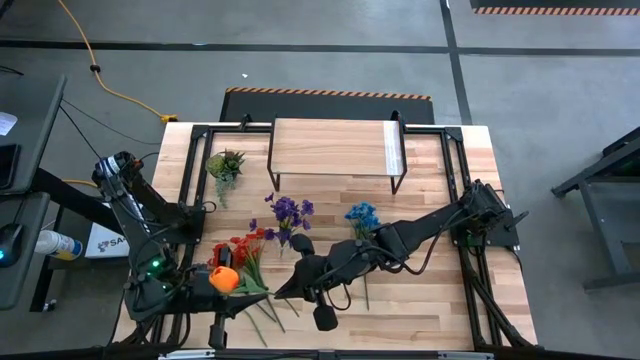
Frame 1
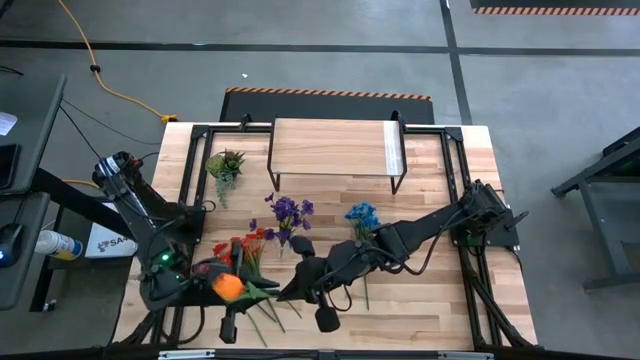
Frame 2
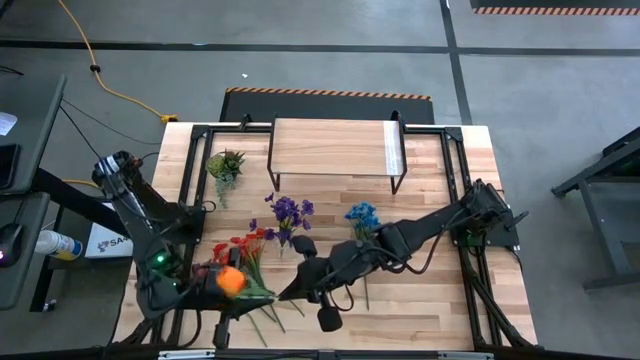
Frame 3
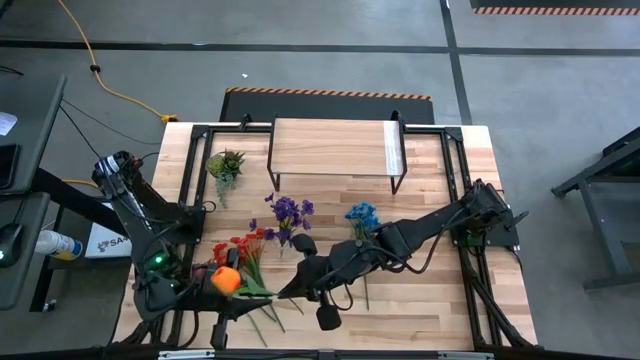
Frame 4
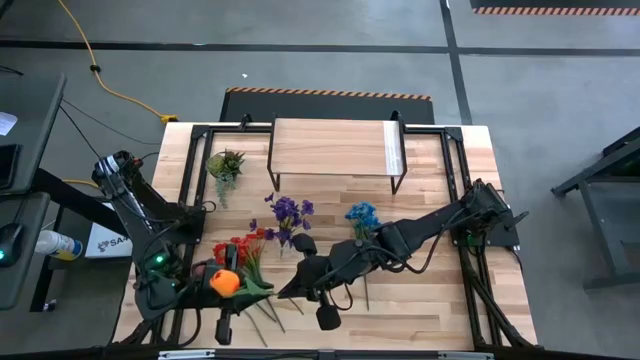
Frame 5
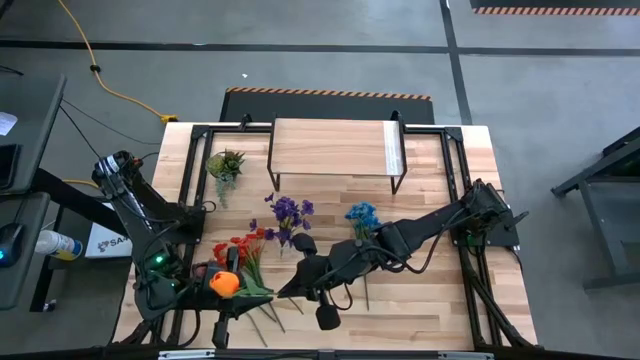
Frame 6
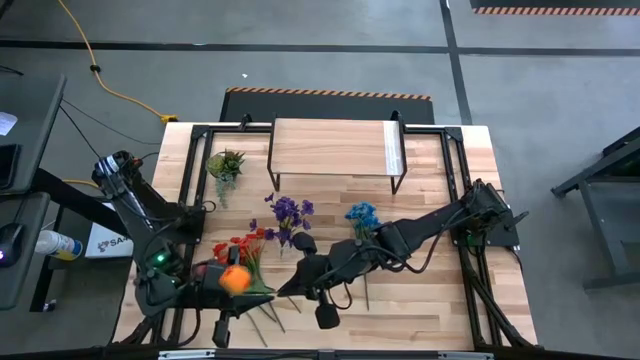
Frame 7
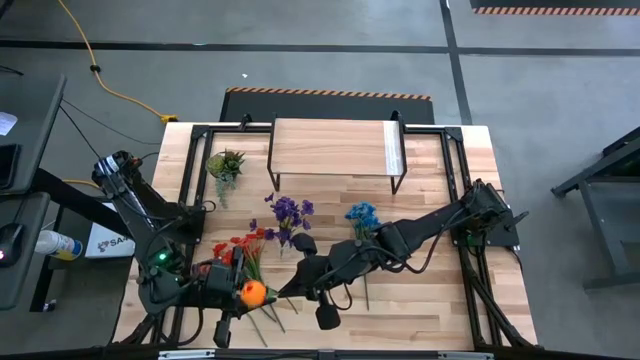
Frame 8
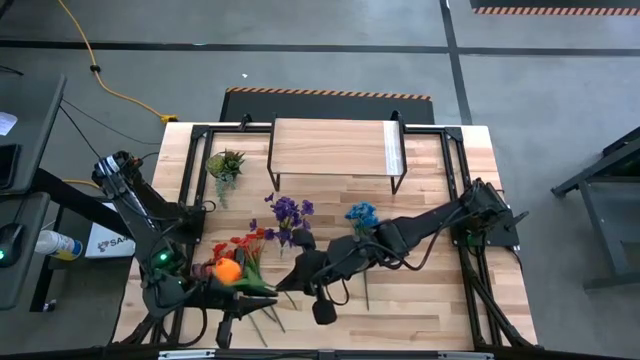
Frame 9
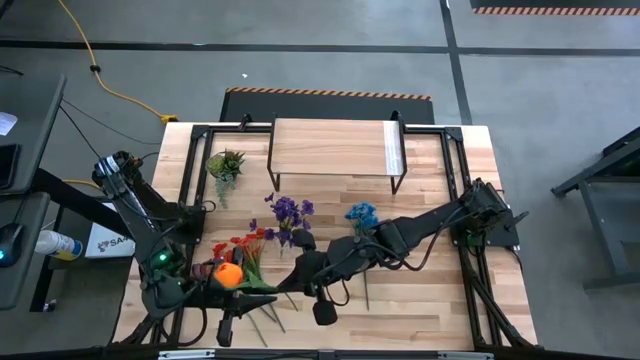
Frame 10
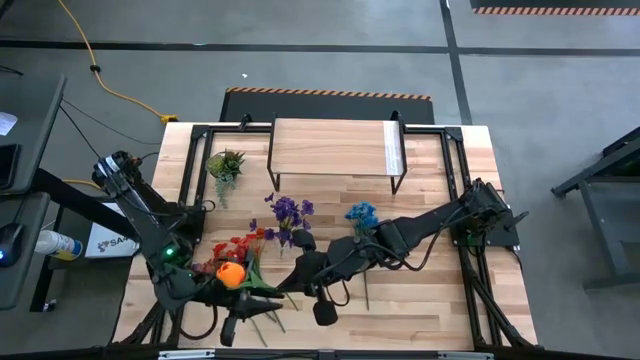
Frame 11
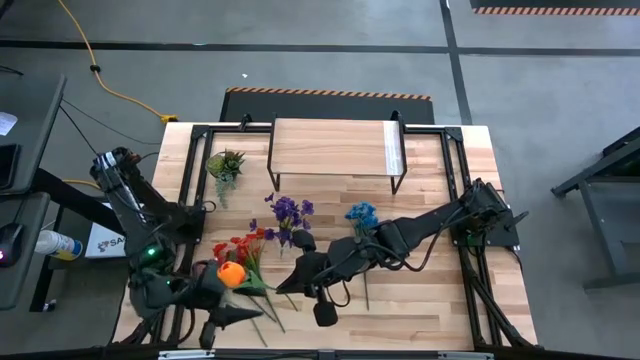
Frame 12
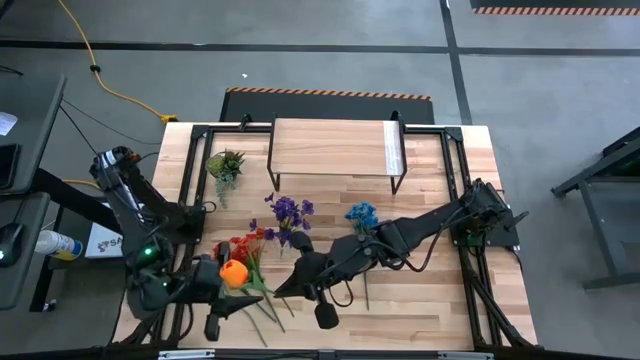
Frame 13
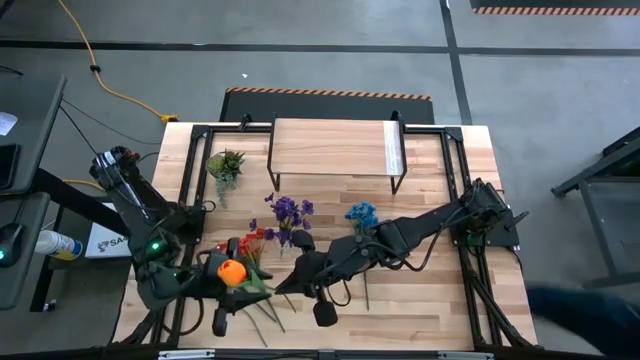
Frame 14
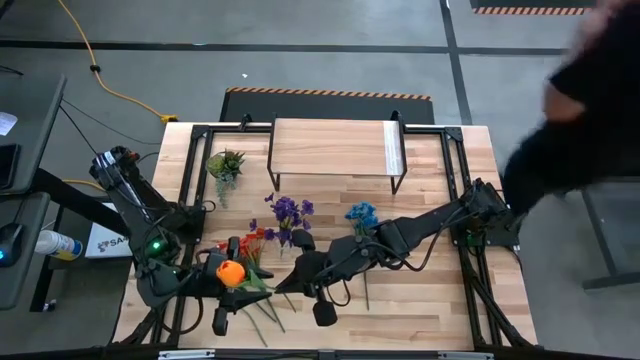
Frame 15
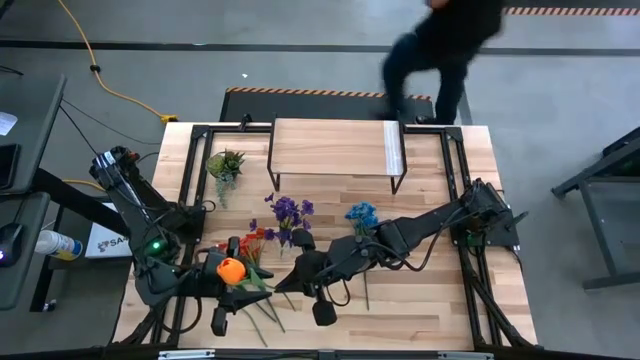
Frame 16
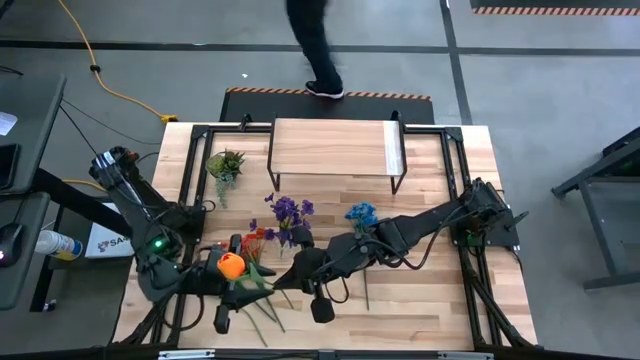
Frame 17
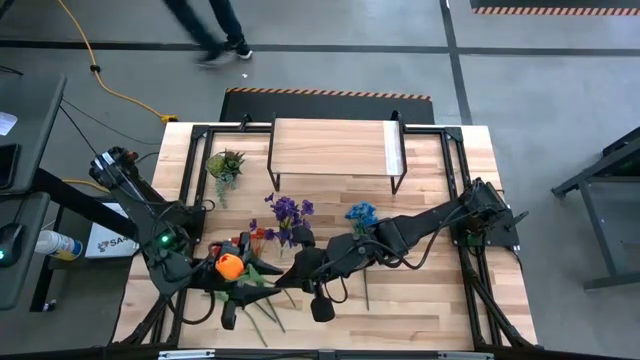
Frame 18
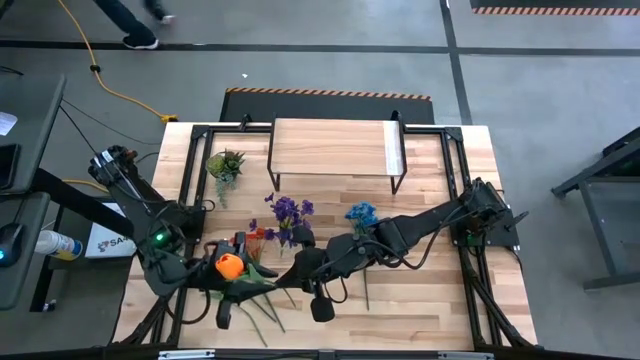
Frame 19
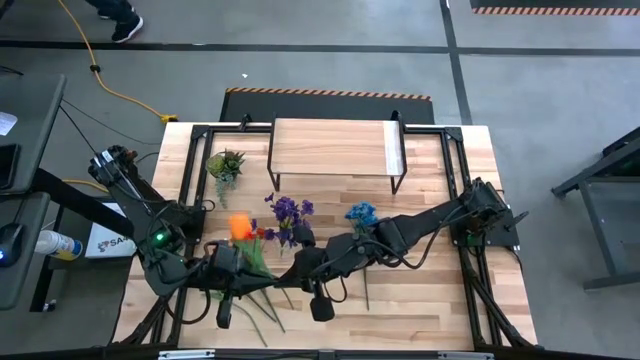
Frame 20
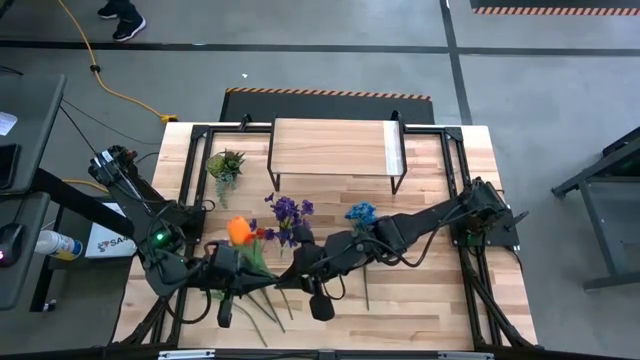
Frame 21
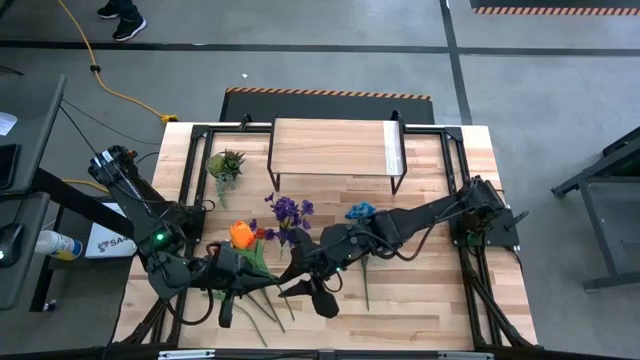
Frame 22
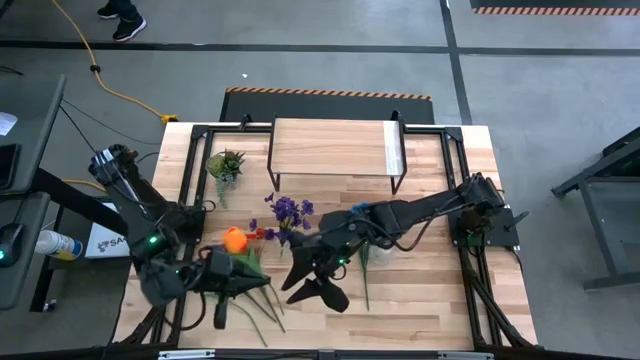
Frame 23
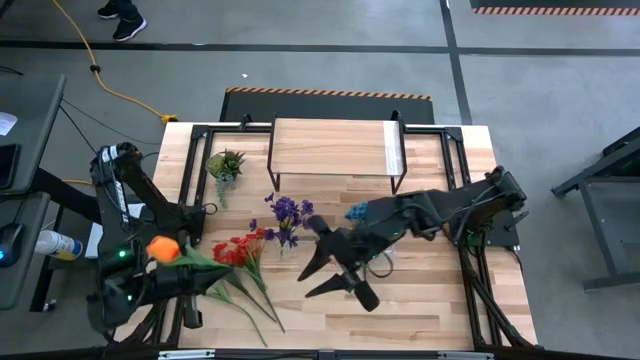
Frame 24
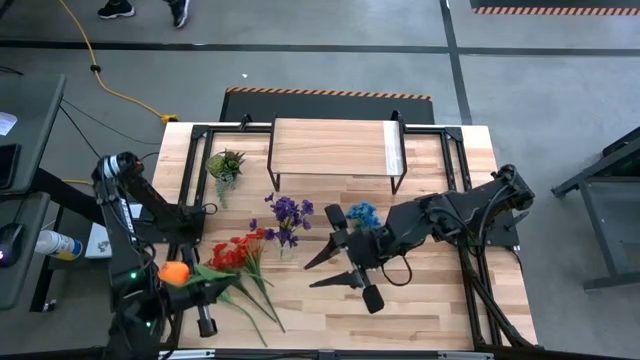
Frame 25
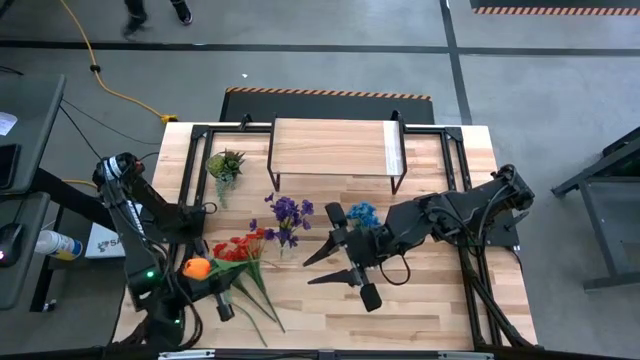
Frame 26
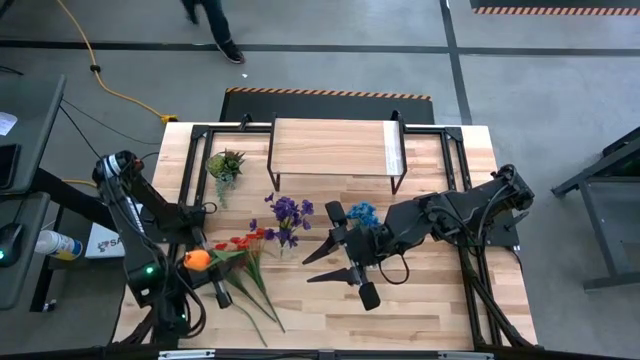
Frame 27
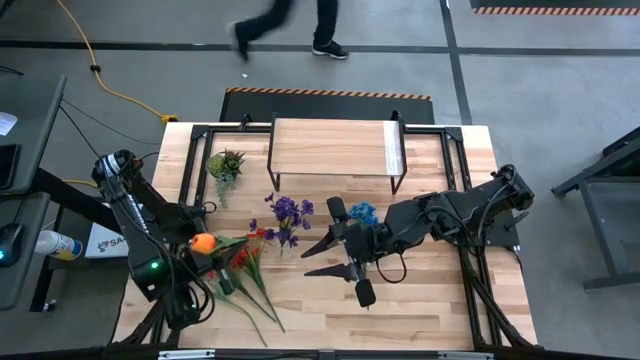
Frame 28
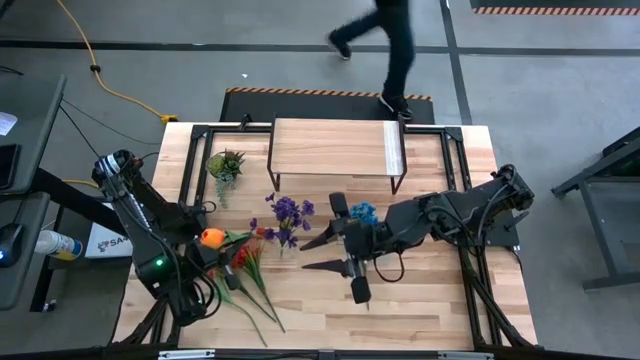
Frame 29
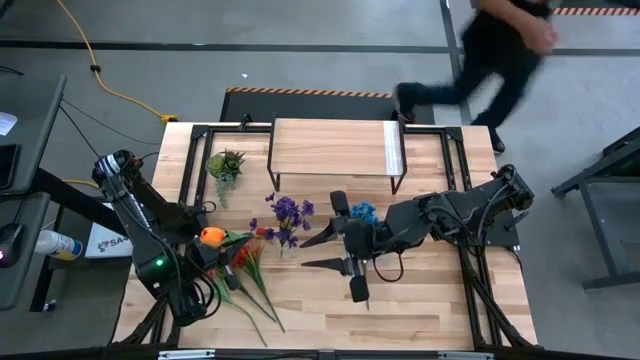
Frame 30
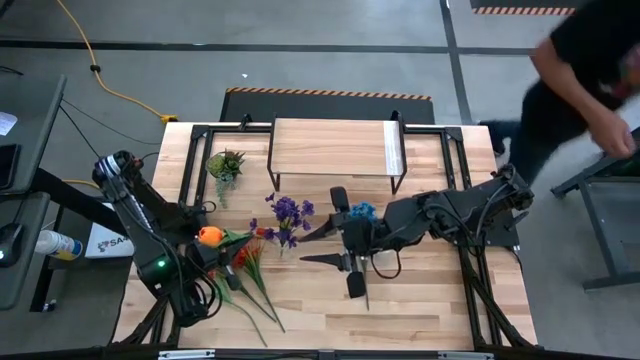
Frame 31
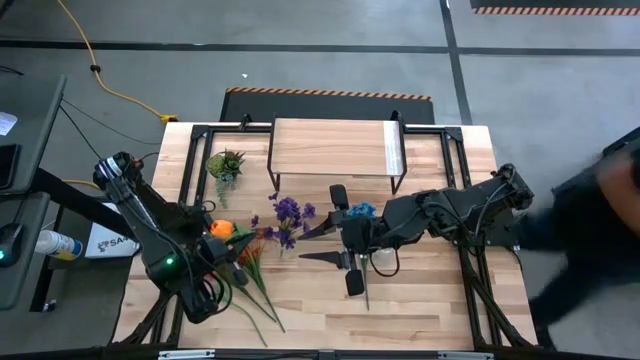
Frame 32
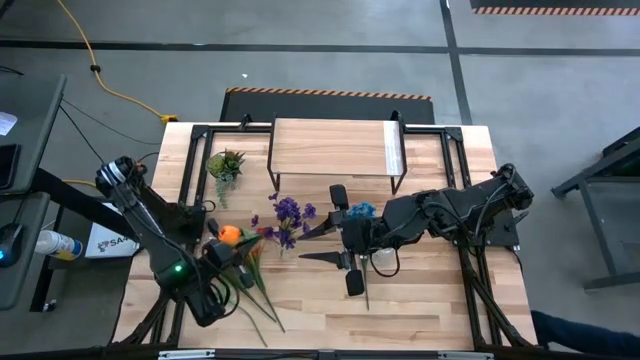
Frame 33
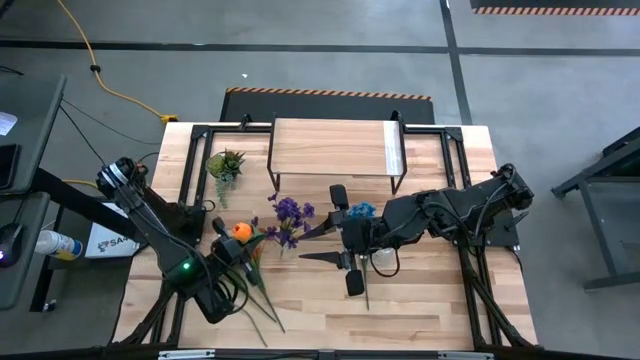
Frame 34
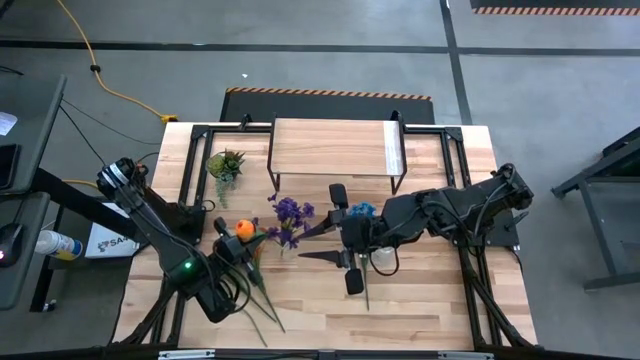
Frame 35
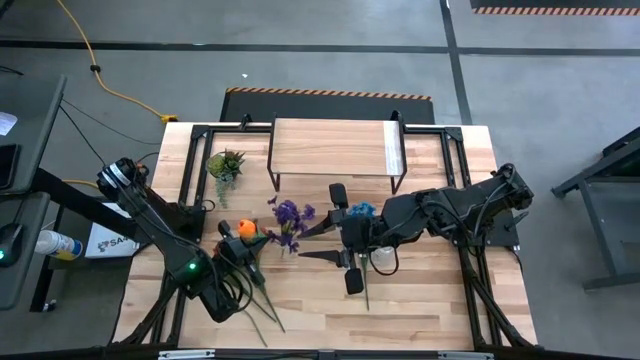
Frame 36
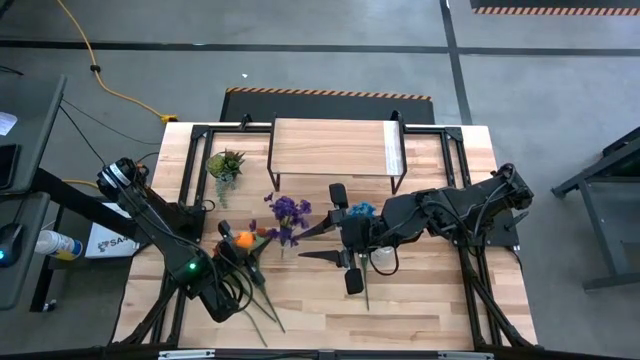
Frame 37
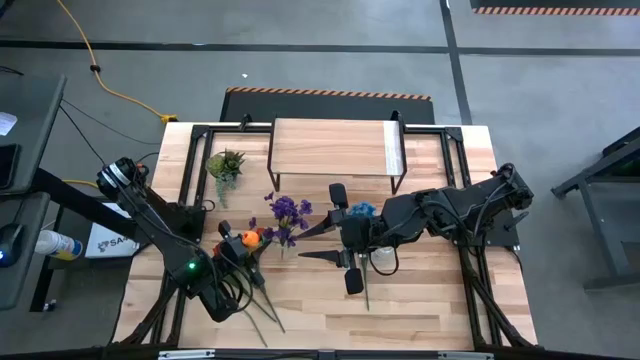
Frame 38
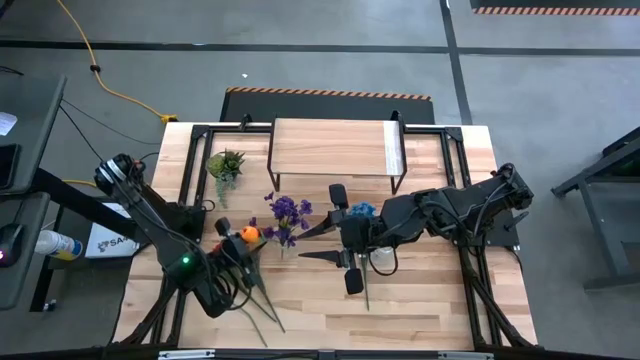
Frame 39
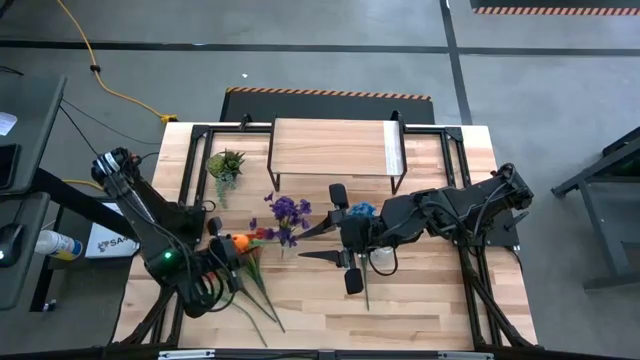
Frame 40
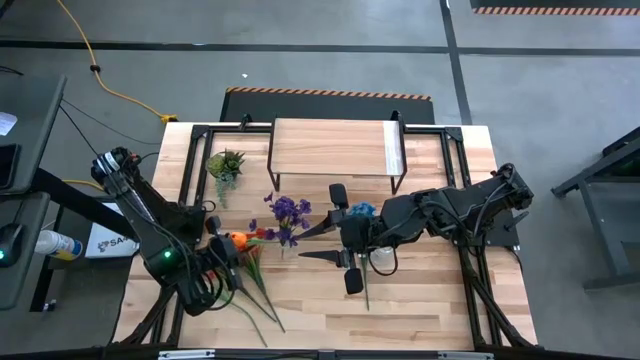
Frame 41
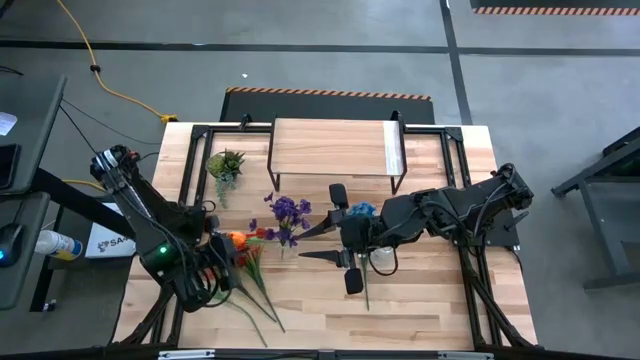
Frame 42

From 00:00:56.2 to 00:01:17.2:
Task: Pick and place flowers into a vace then onto a shelf
Put the orange flower into the left transparent flower vase
